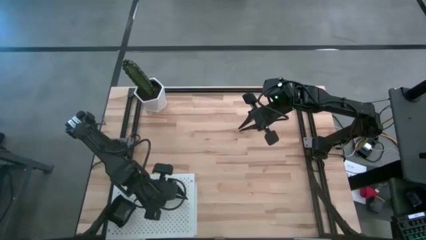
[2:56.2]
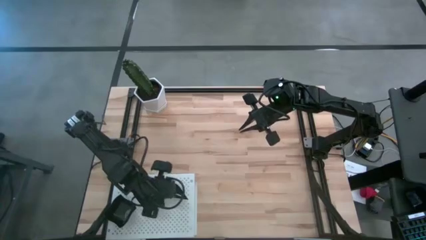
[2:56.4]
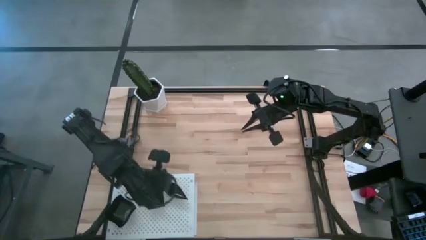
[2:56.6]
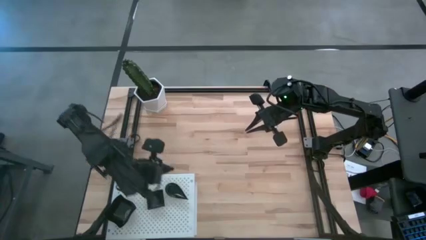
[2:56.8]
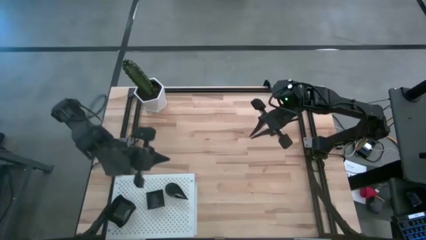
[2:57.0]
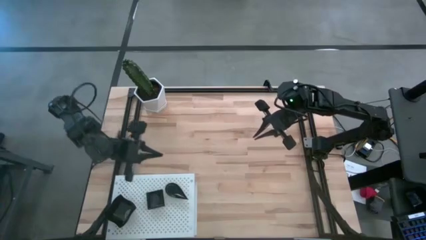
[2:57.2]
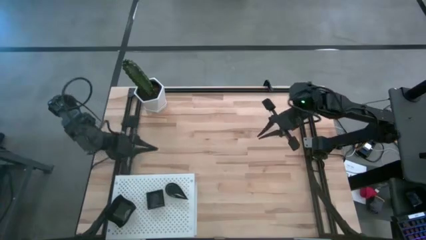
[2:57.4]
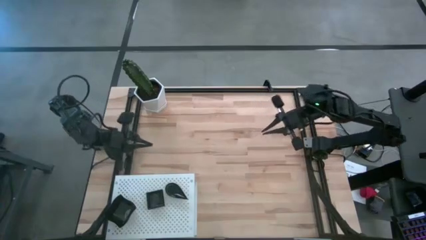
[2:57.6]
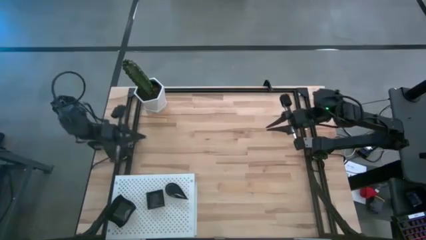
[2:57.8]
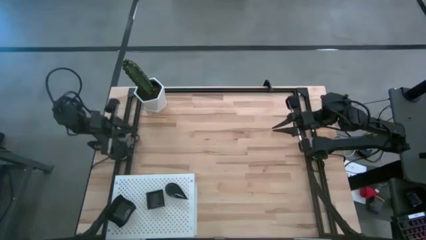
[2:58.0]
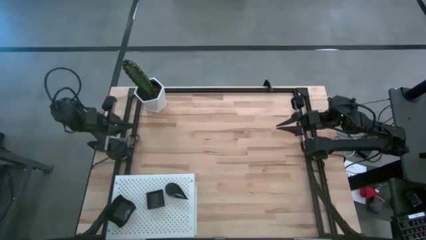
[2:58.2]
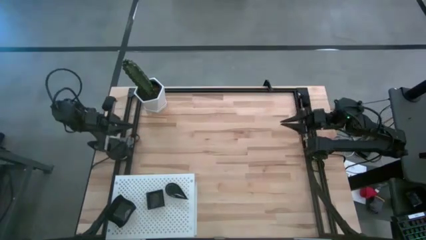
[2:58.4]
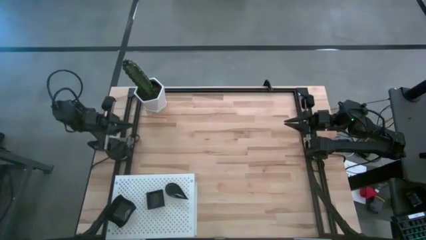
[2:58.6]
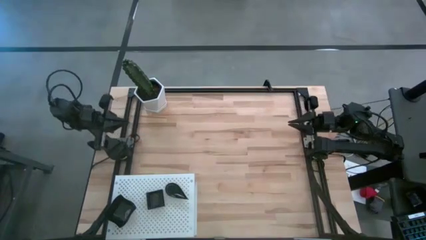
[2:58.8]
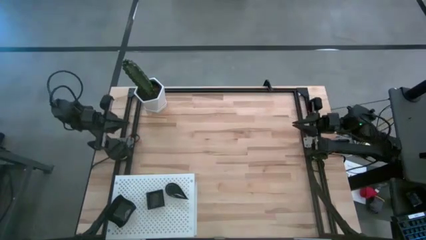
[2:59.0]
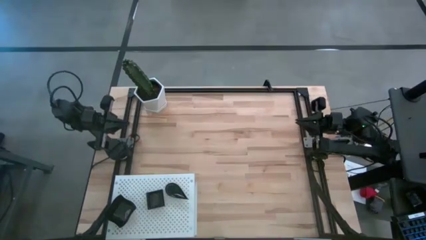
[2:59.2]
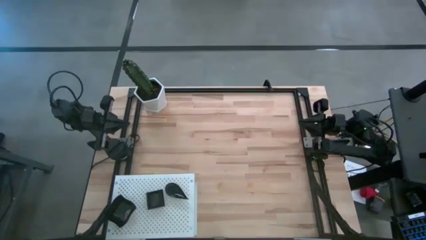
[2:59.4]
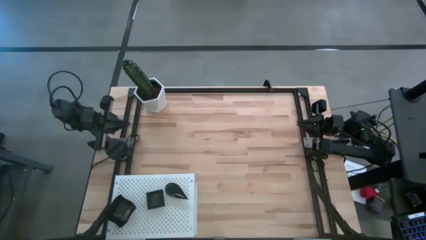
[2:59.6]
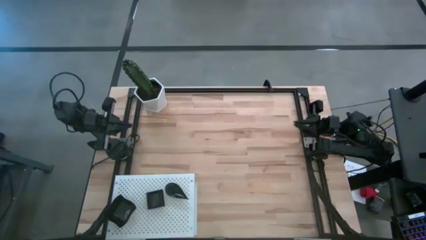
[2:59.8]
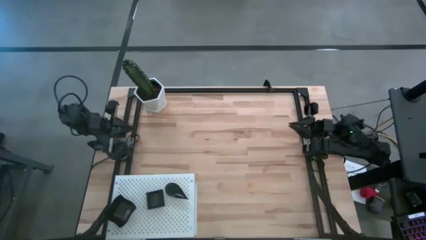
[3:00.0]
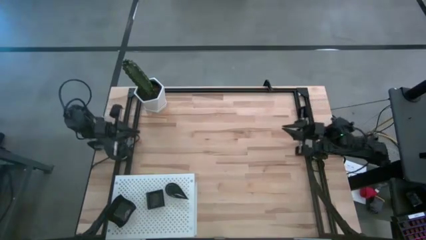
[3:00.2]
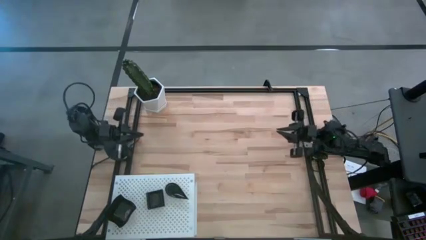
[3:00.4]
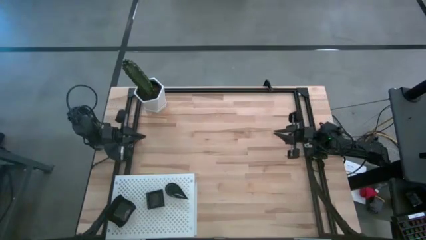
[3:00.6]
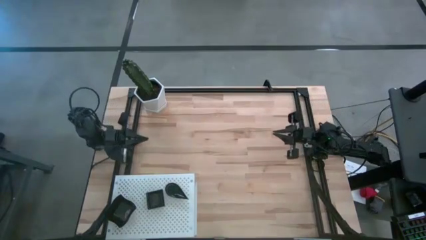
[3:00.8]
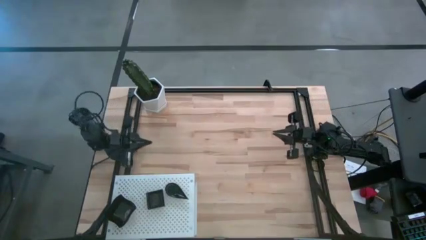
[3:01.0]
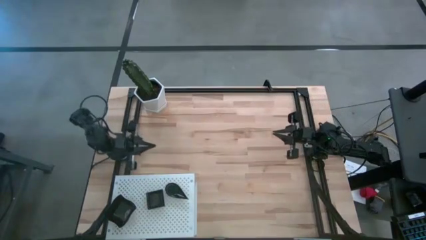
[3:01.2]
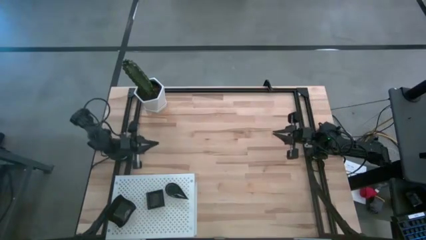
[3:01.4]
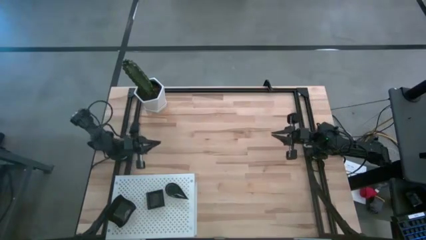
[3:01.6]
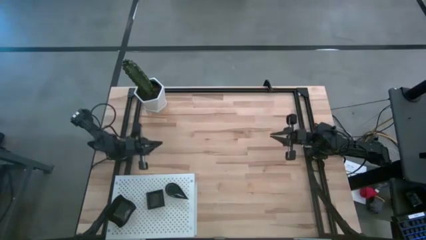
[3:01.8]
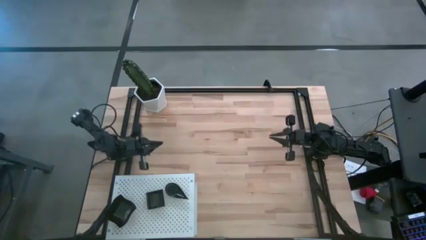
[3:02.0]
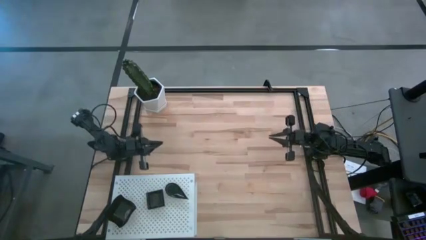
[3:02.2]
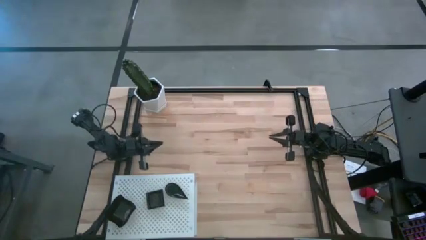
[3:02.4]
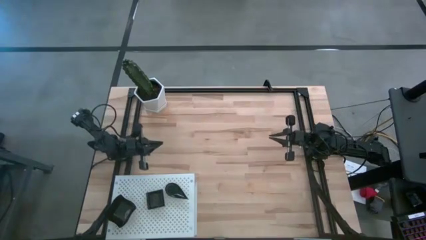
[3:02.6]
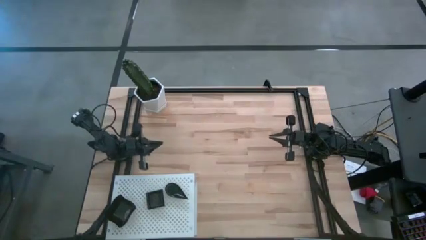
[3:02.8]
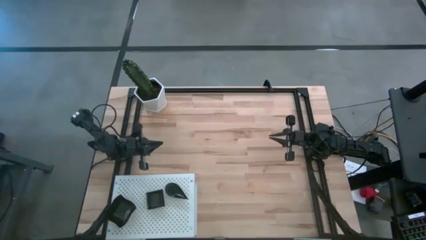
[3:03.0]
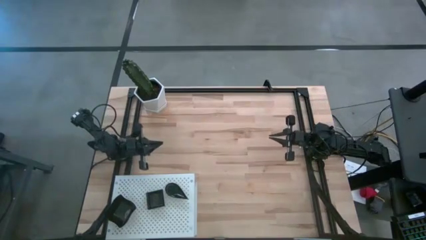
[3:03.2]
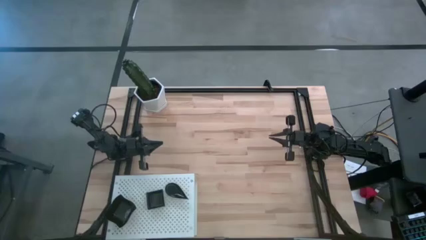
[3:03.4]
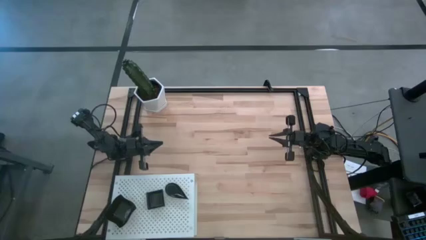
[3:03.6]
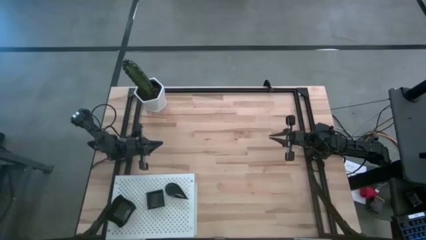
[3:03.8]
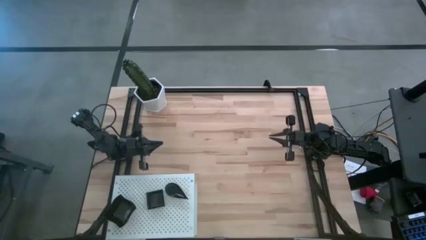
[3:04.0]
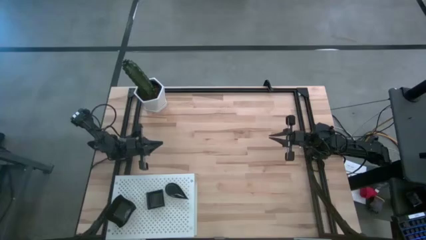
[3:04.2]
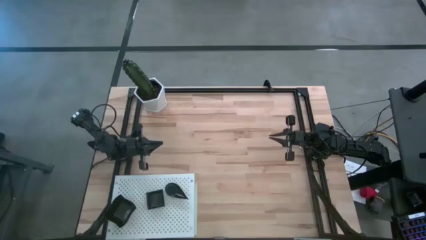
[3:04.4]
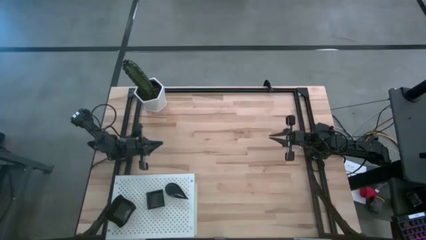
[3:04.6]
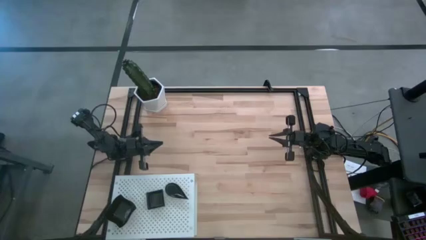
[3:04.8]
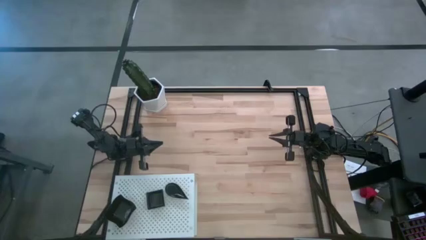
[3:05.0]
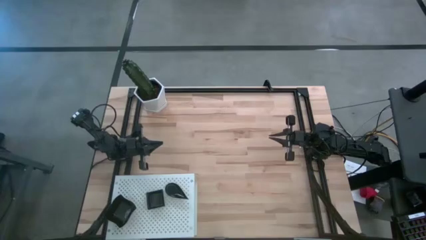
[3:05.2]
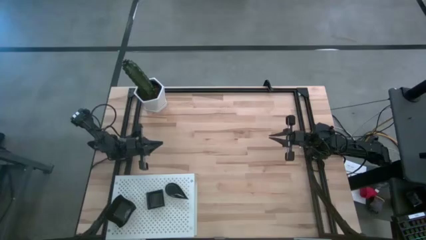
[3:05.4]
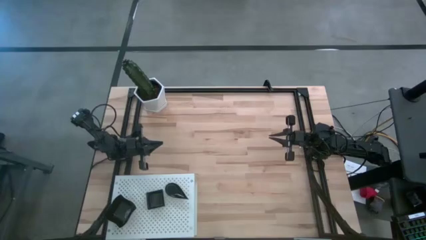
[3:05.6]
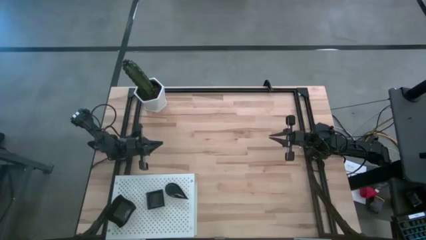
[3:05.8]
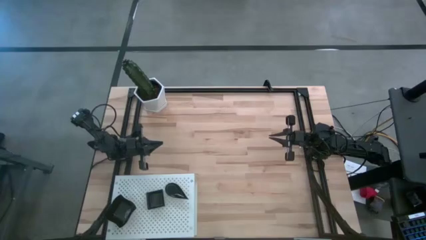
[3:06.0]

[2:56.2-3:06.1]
Task: Pick & Place Mini shaped plates
Return to Home Position

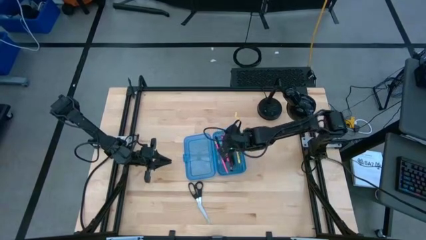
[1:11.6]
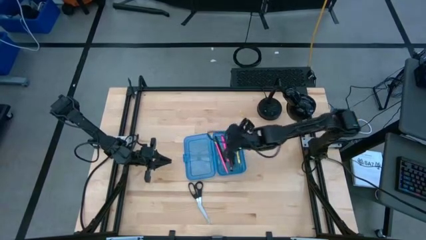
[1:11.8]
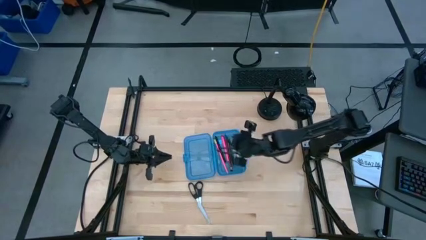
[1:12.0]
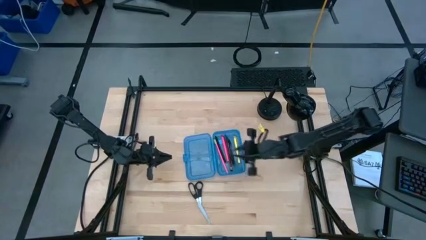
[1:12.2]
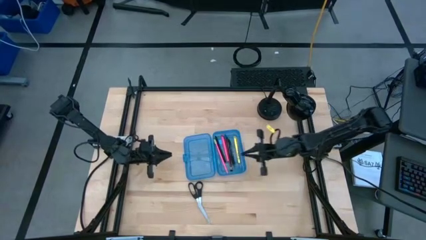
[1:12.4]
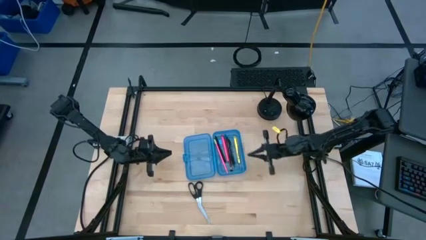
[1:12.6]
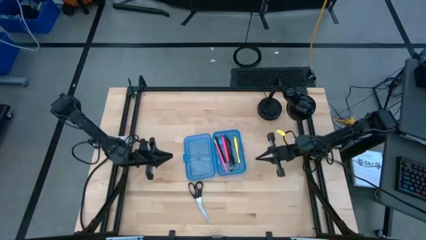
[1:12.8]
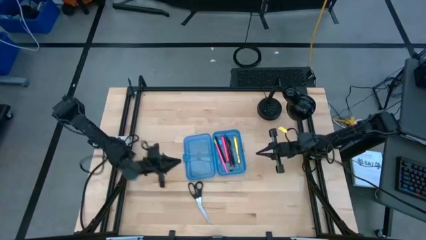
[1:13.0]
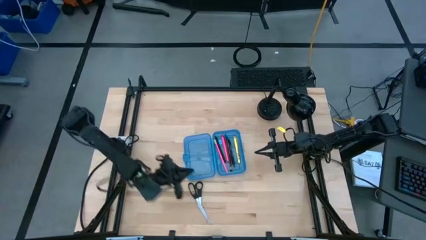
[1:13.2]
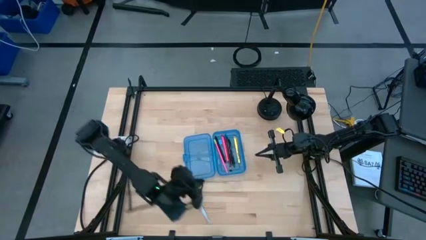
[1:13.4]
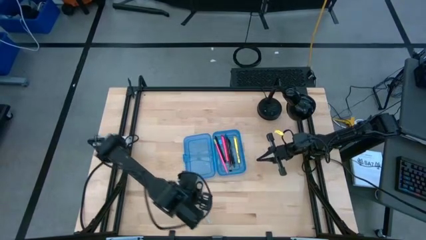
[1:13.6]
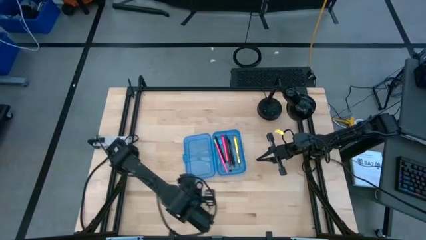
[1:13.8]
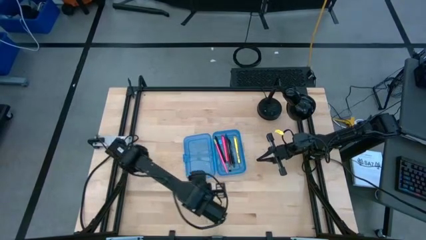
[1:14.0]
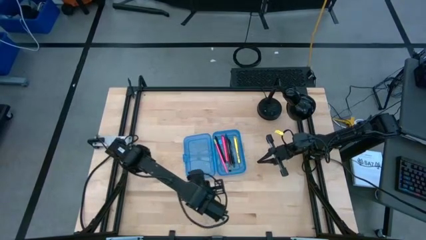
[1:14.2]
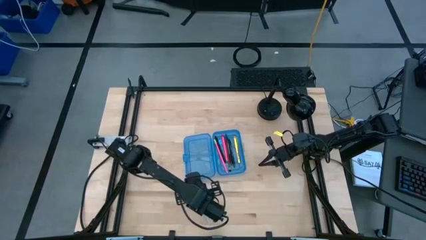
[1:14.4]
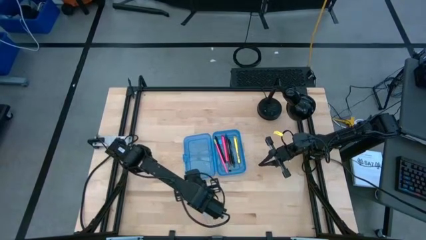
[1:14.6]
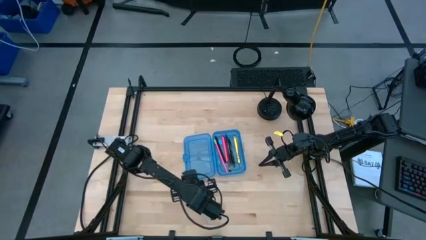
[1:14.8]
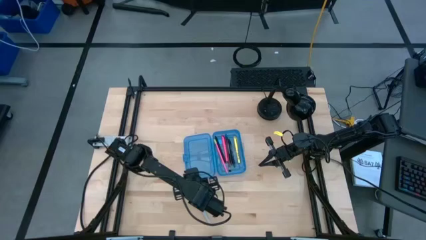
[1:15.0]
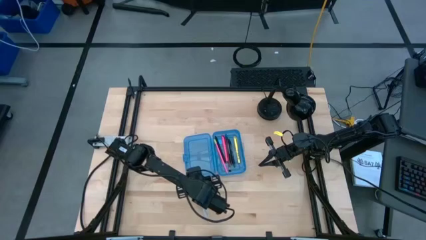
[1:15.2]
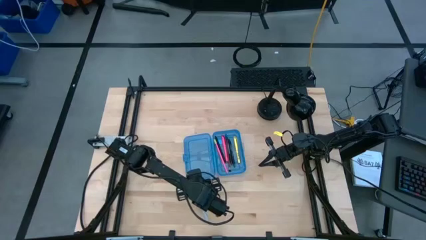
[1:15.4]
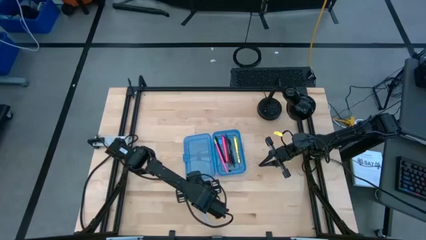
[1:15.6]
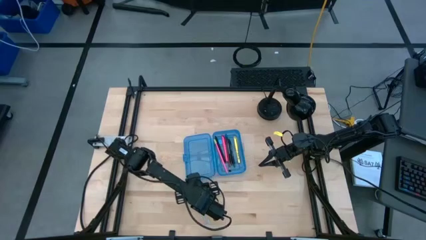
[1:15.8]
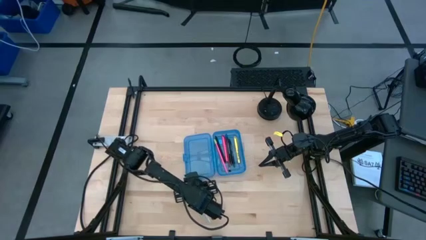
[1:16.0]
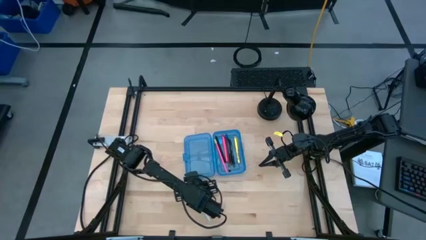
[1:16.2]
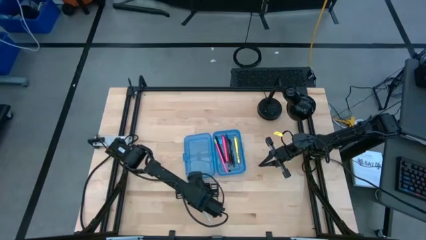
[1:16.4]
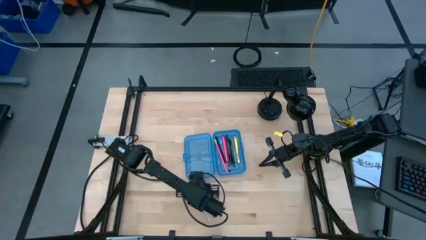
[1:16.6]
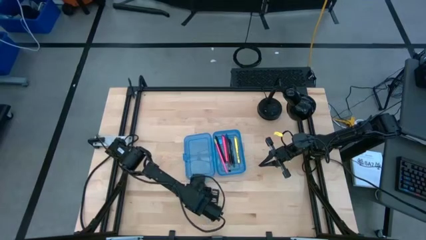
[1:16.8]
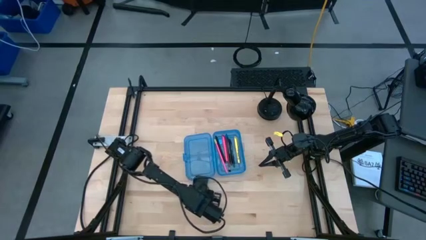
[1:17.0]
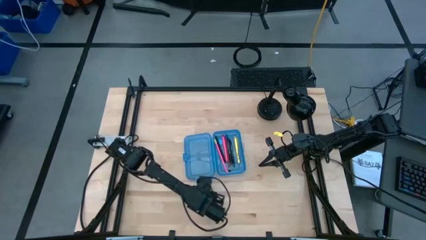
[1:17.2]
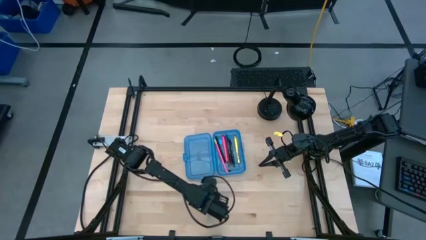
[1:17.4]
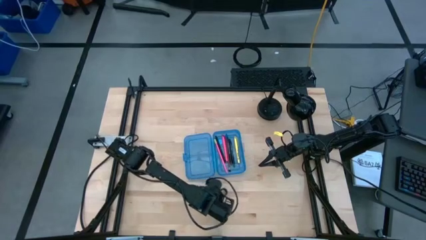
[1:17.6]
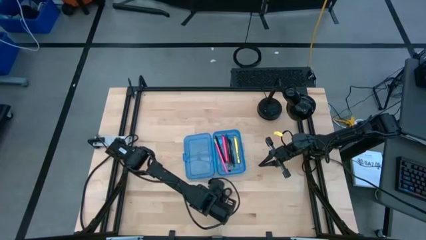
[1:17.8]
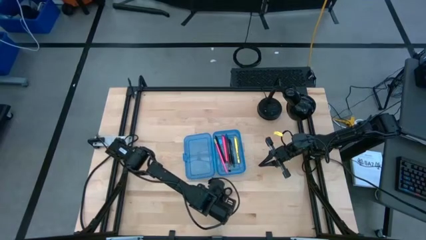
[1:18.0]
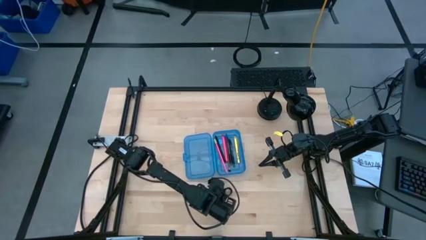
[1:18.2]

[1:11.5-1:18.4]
Task: Pick & place school supplies into a supply box
Put the black scissors into the blue supply box
